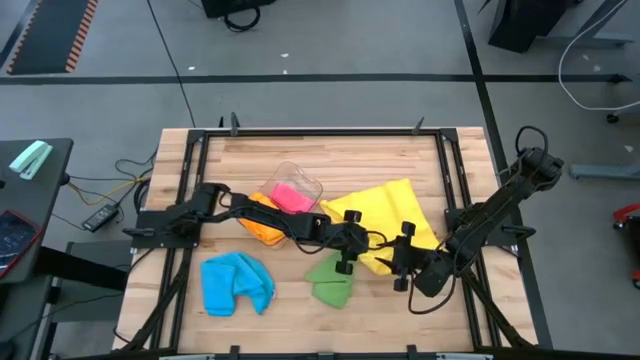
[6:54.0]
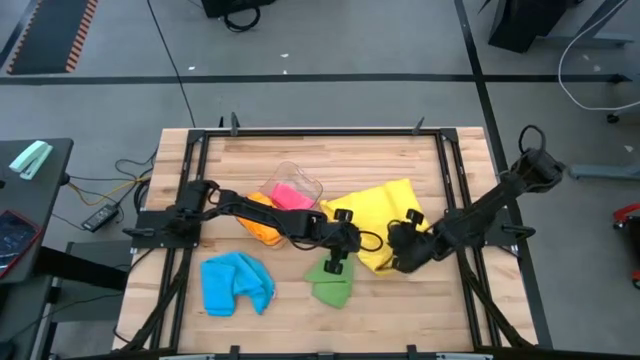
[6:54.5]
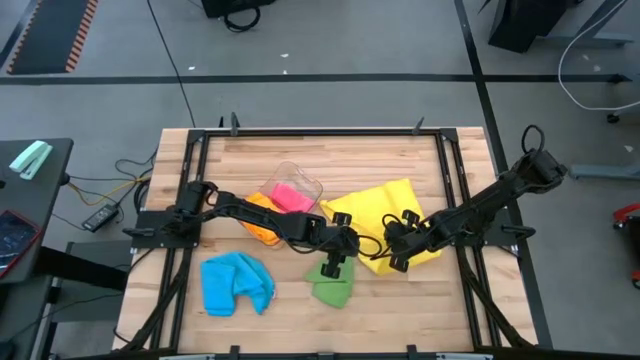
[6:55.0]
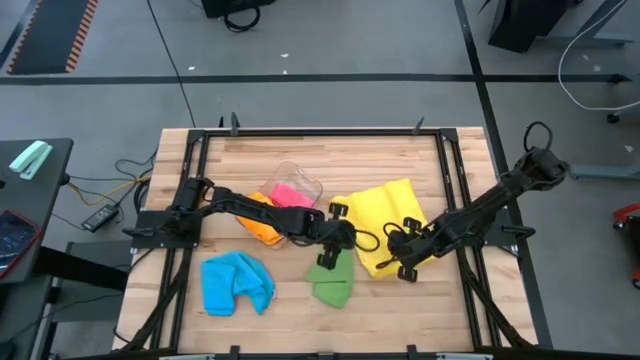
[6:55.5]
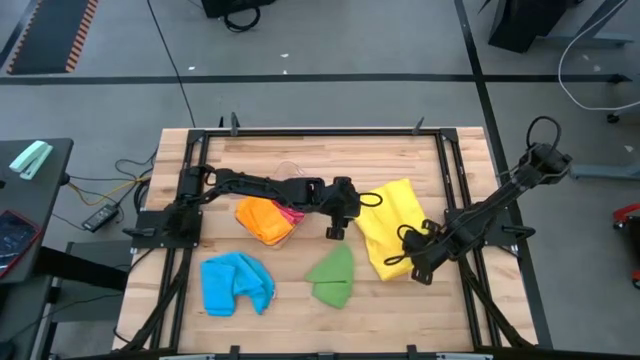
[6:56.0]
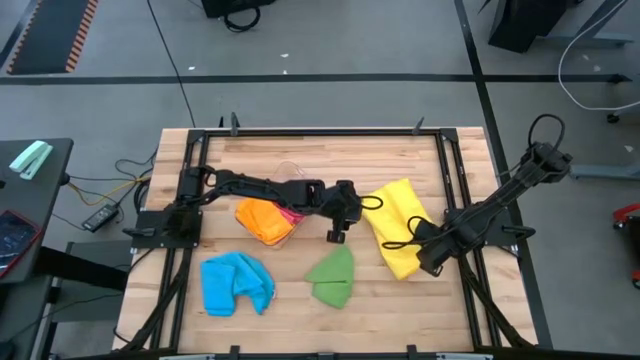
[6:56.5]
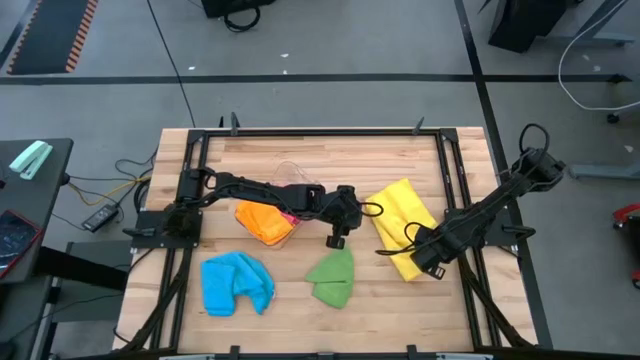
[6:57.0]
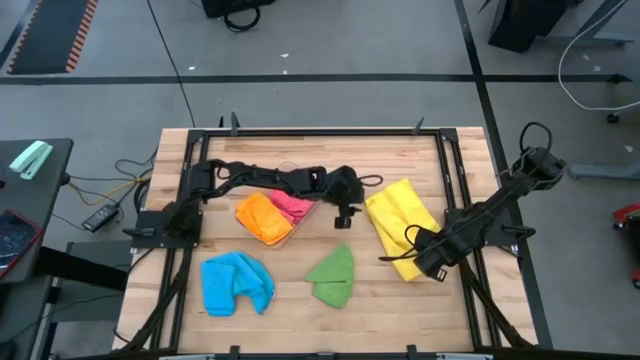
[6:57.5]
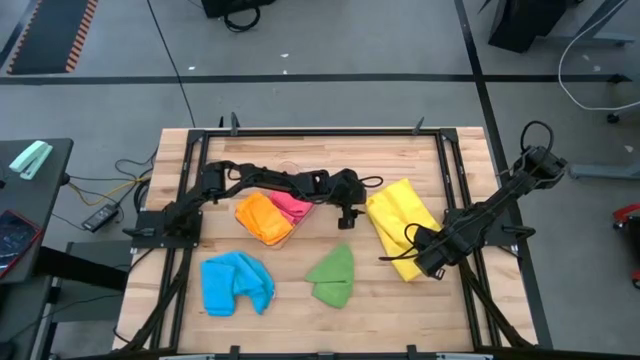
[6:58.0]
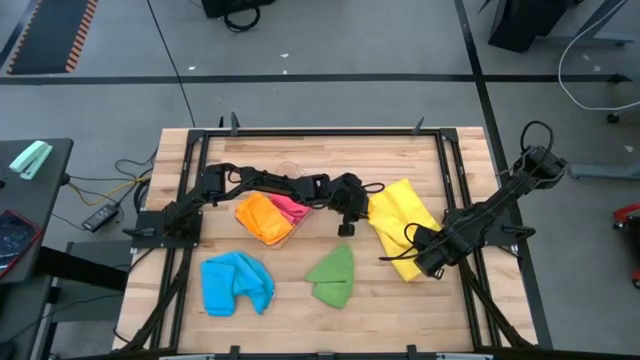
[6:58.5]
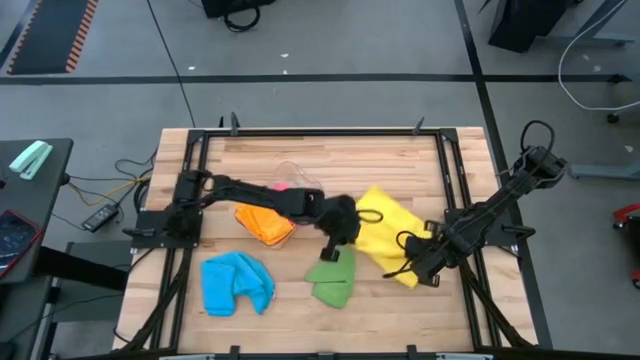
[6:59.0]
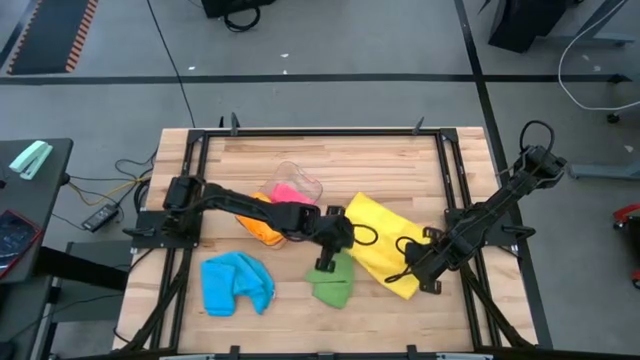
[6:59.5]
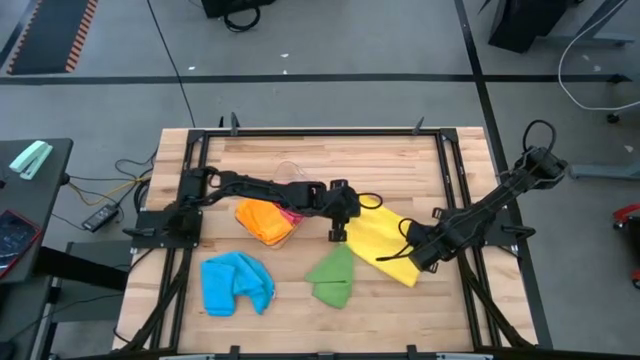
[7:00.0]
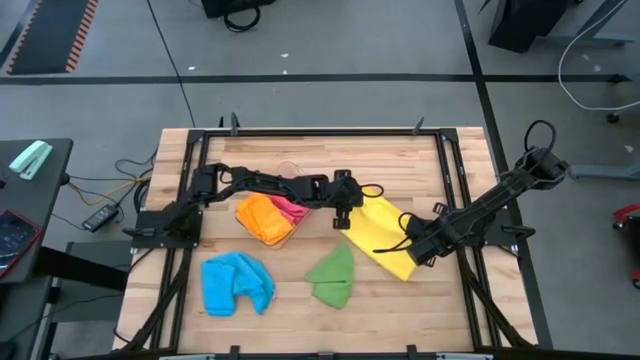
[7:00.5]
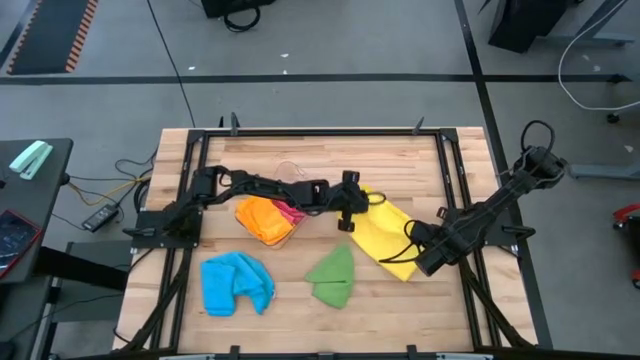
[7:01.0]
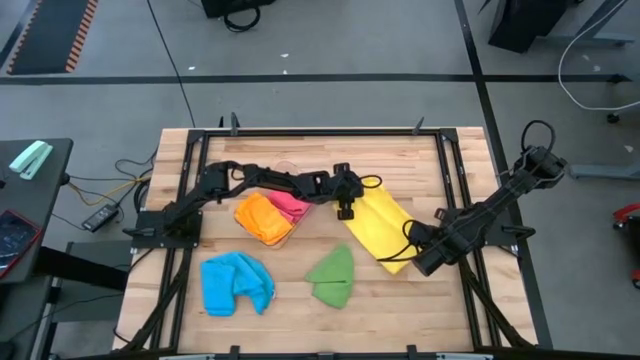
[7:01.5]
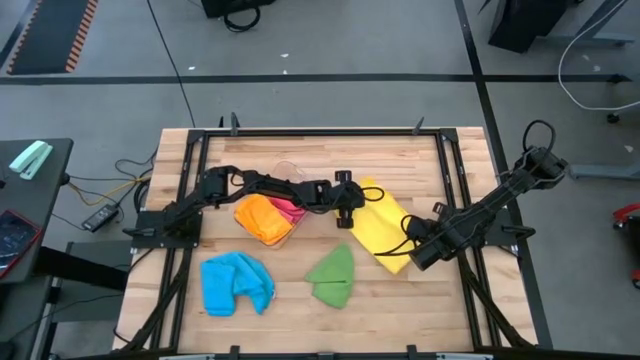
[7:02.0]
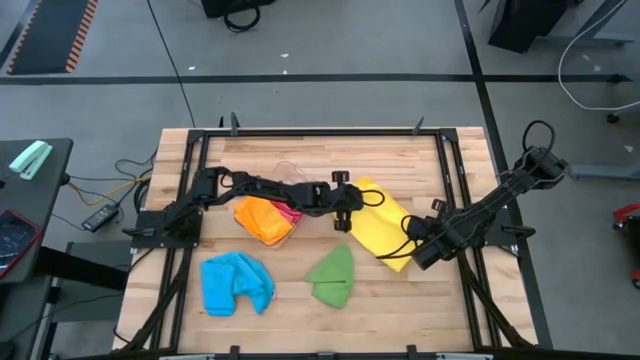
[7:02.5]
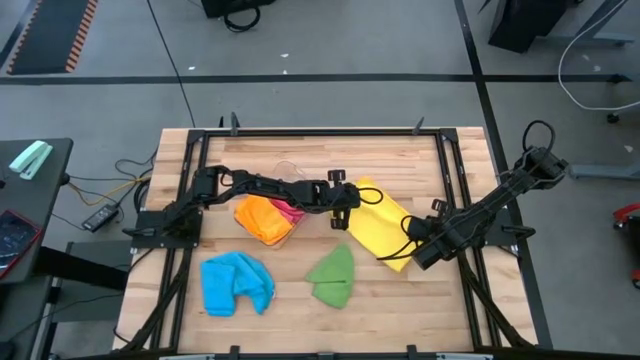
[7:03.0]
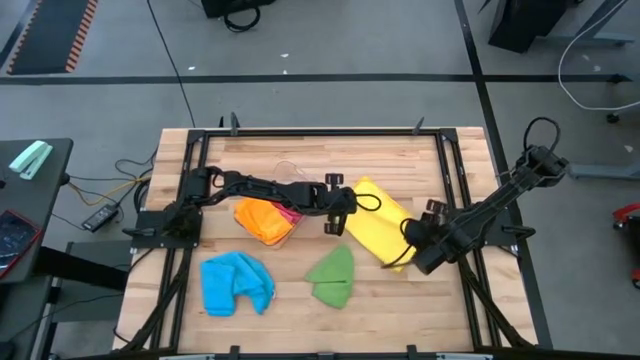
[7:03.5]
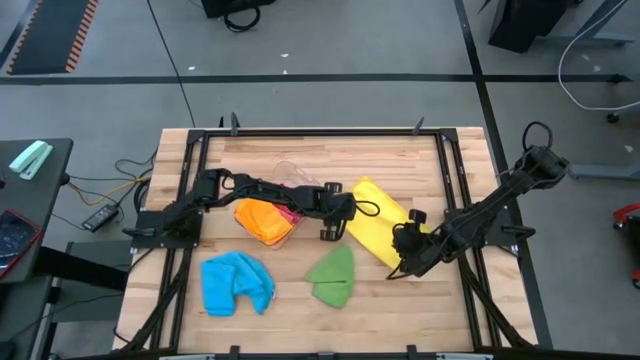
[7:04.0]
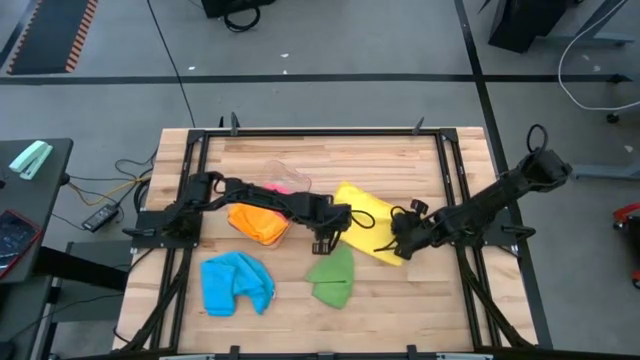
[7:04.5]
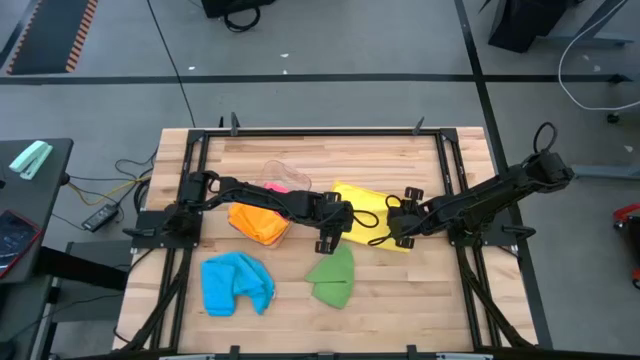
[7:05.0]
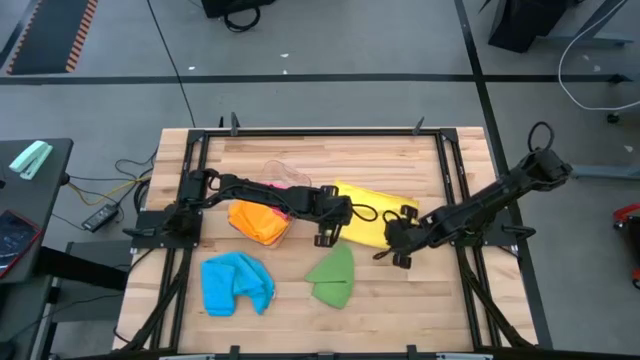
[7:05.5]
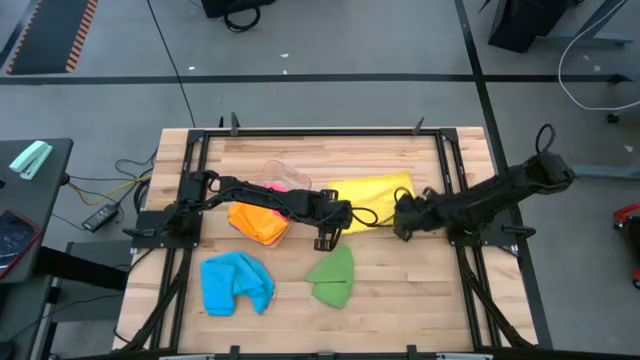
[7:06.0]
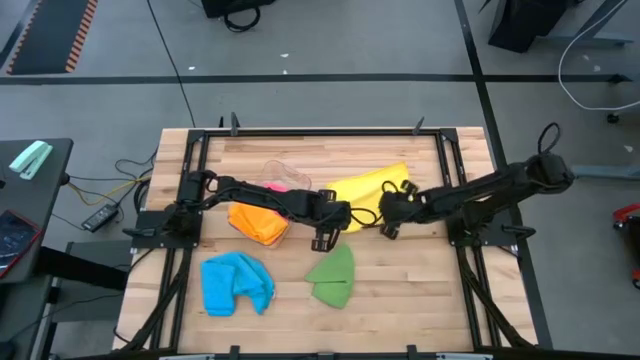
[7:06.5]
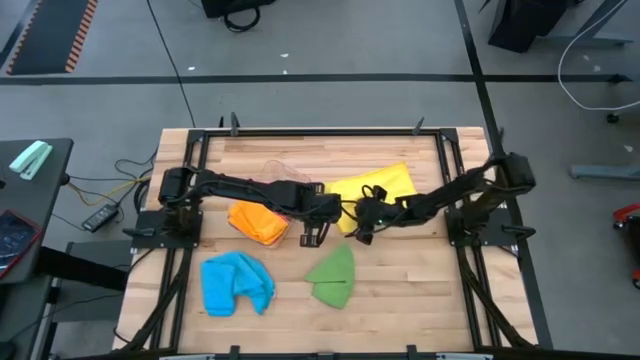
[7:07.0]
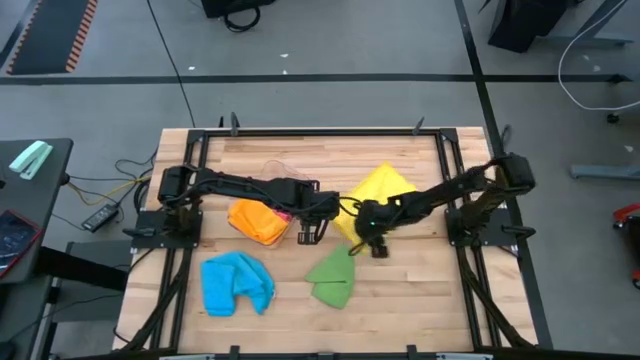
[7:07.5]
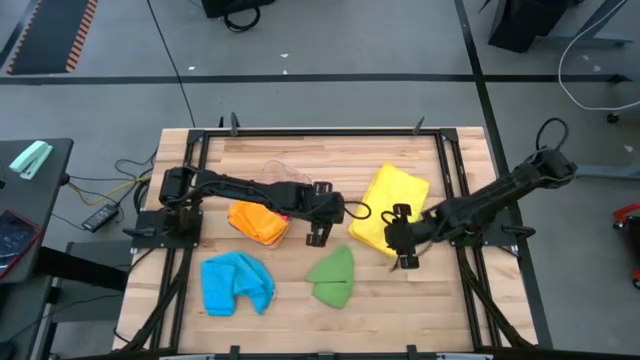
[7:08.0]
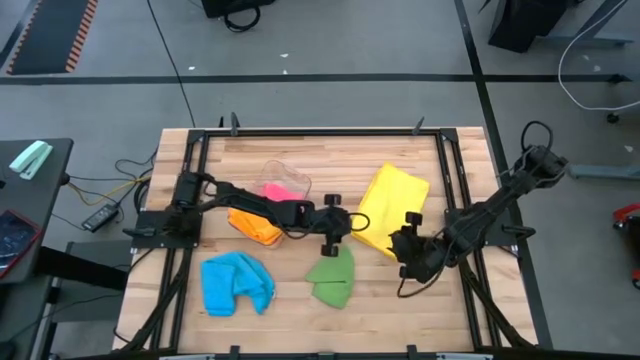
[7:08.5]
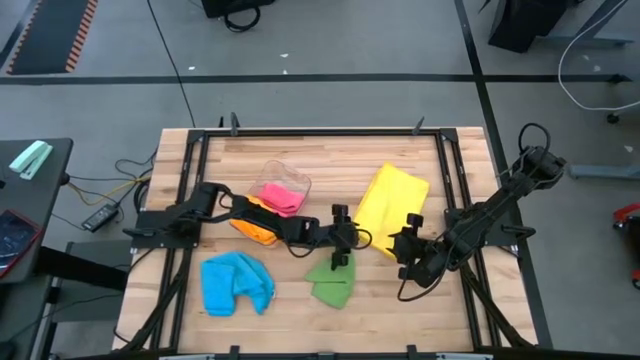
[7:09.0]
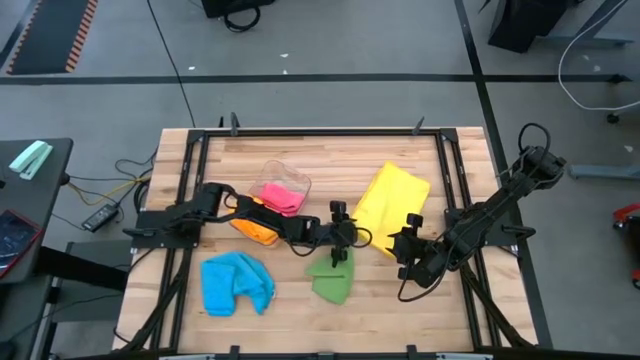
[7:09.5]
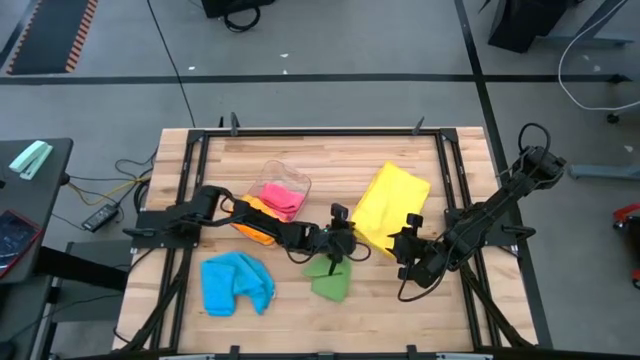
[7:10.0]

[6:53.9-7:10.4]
Task: Fold microfiber towels
Fold the yellow microfiber towel
